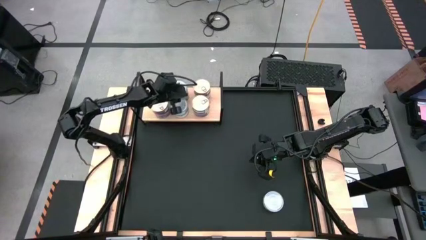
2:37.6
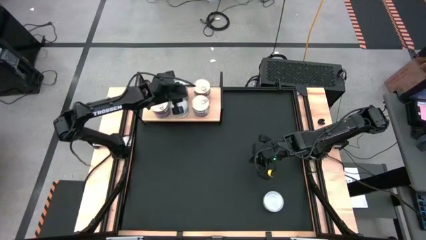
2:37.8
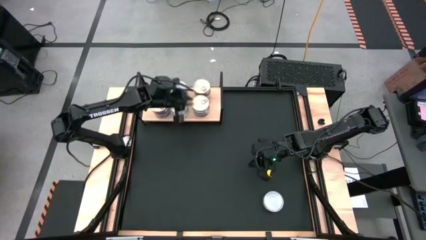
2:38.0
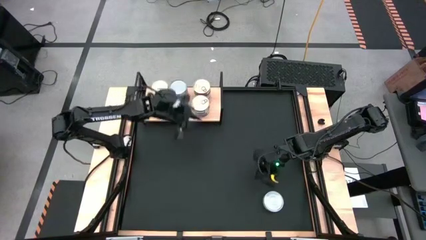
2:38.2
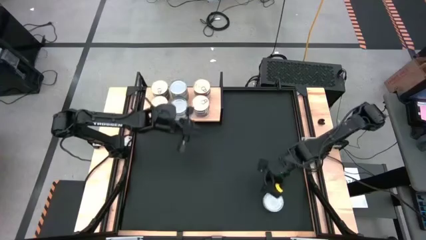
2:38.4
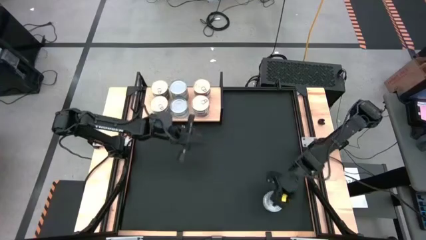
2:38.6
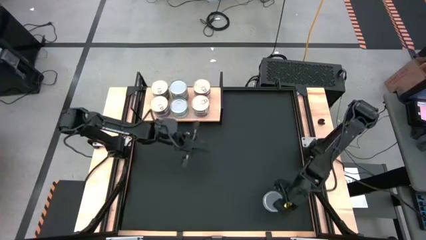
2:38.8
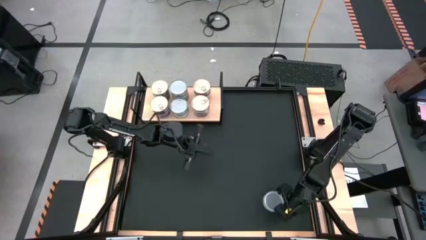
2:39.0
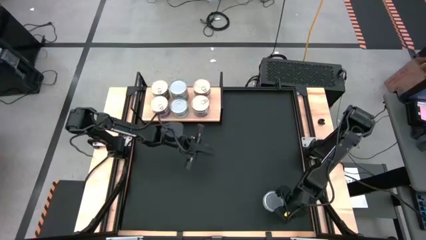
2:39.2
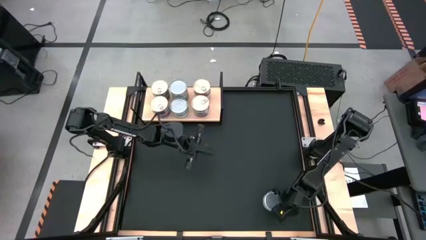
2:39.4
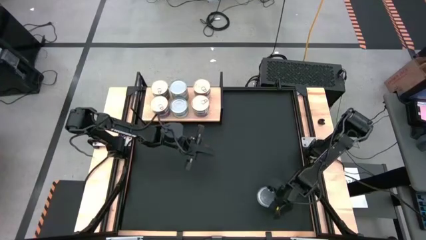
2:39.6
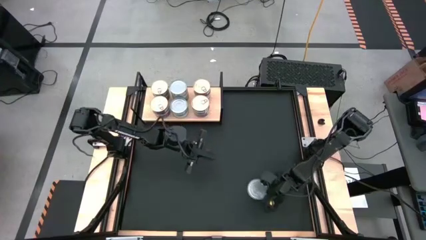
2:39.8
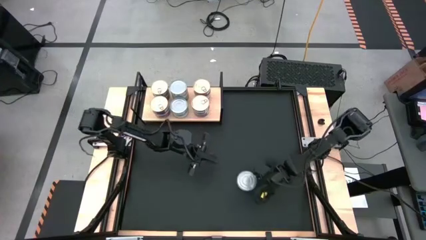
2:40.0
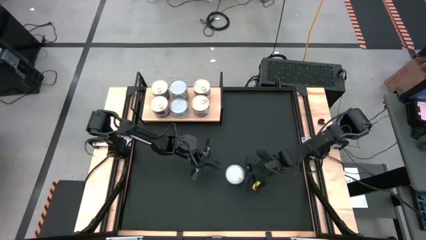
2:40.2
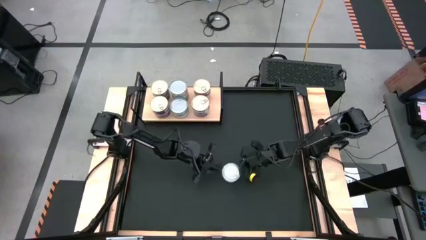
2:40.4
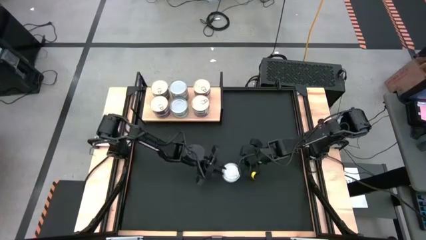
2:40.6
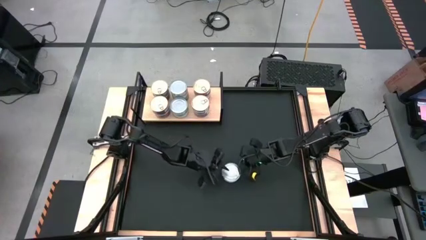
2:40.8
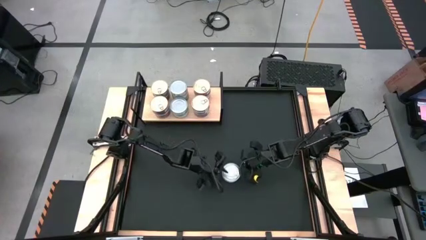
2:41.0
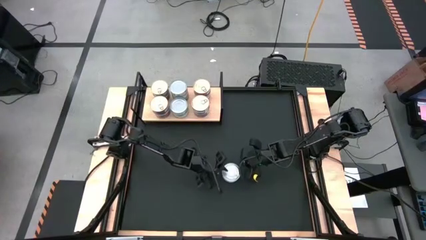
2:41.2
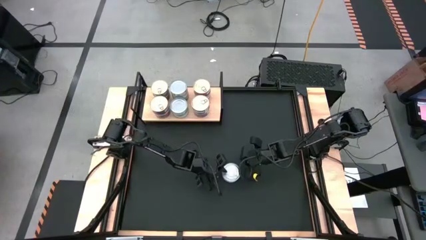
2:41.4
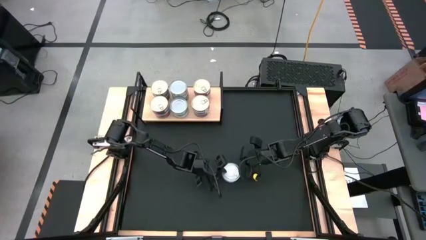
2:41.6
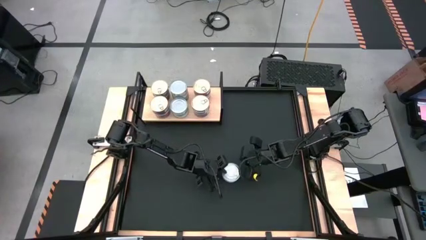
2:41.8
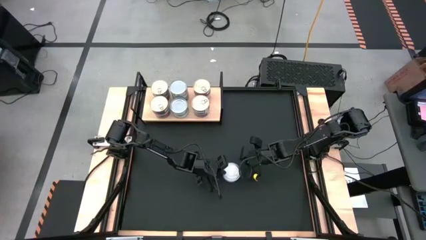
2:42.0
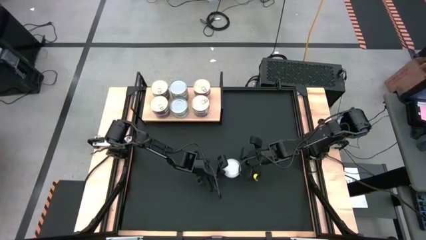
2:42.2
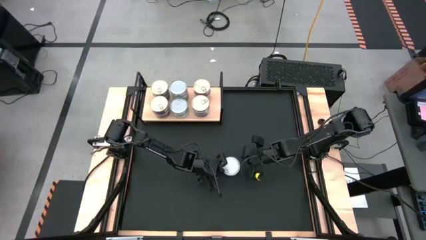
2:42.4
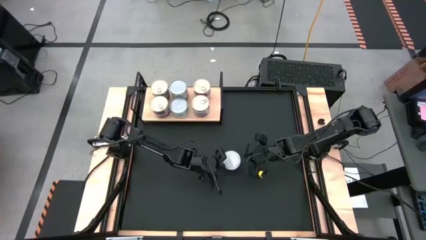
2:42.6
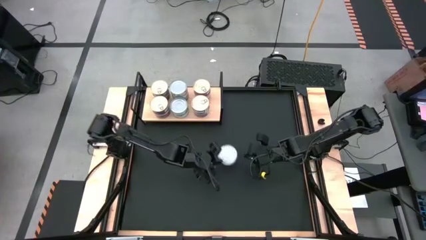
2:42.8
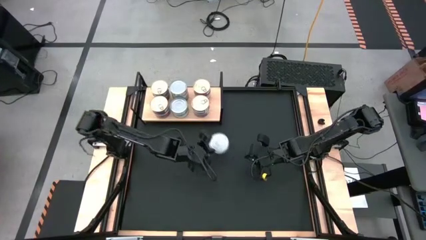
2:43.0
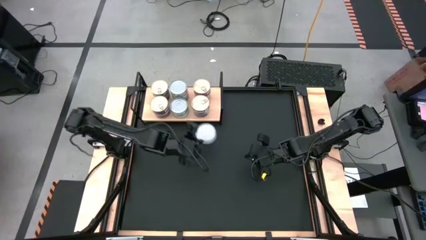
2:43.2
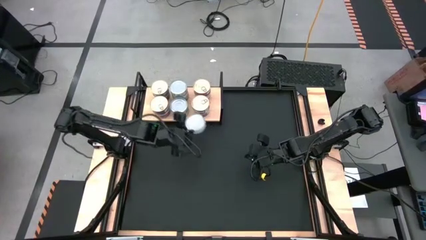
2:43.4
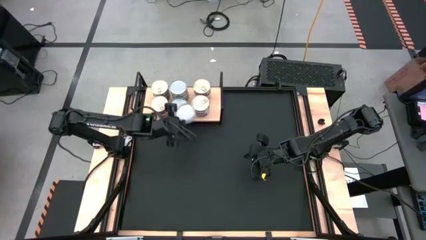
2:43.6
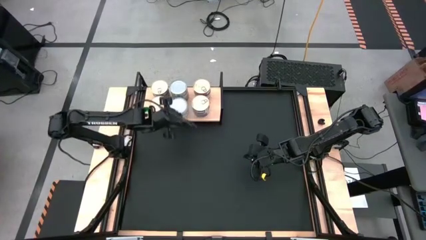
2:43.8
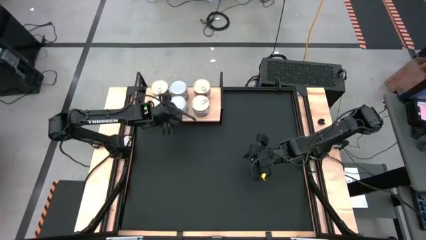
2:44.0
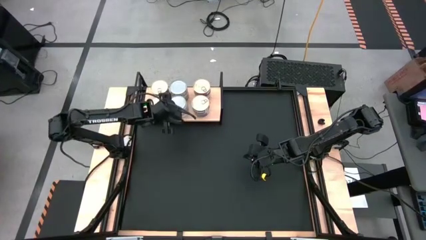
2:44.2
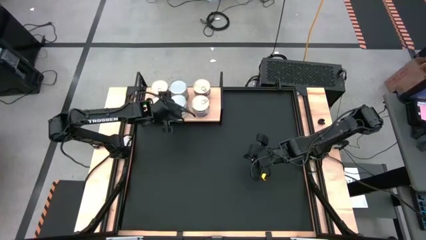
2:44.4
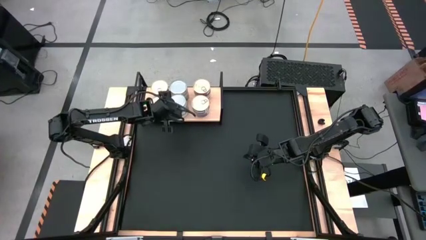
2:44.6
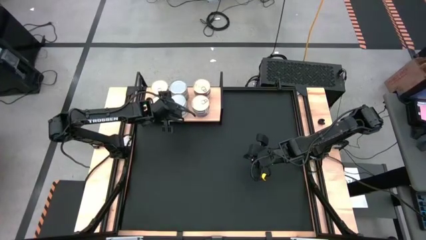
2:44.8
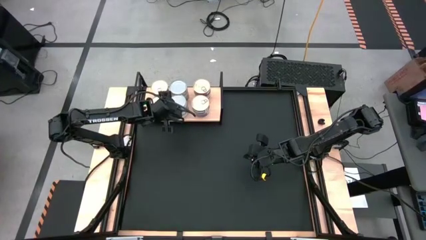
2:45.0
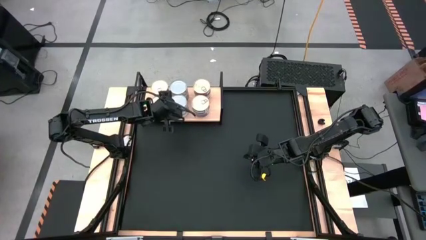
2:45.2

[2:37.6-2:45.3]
Task: Stack canned seafood by type on shelf
Stack the green tuna can on top of the green tuna on the shelf

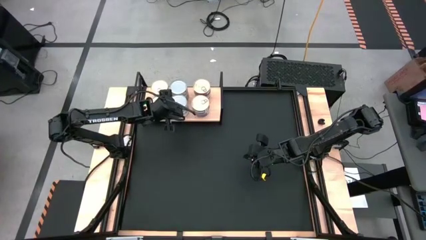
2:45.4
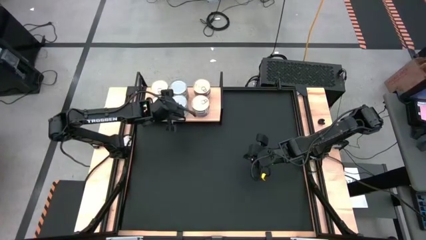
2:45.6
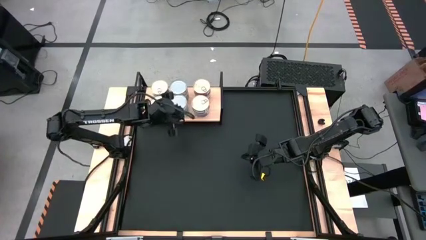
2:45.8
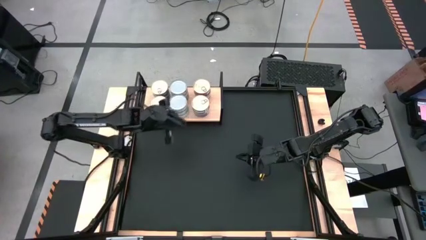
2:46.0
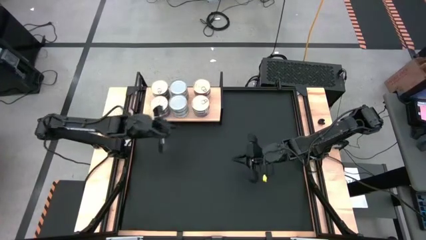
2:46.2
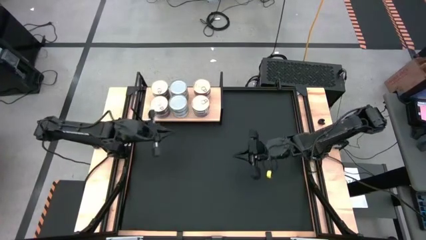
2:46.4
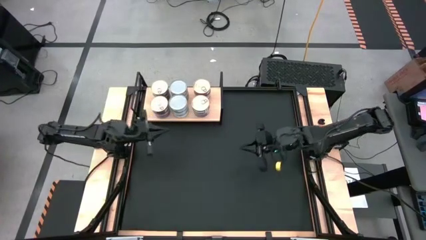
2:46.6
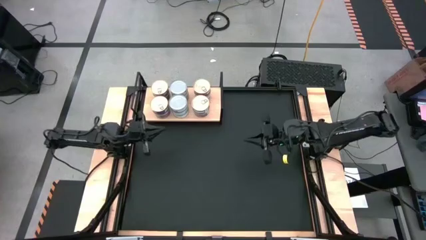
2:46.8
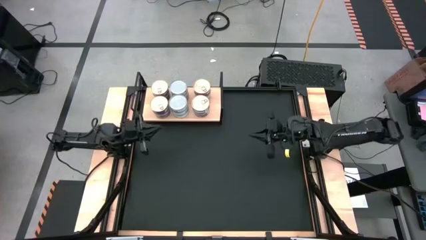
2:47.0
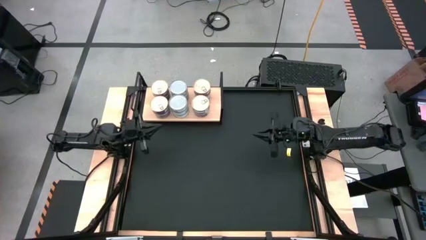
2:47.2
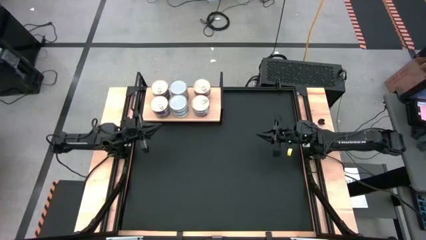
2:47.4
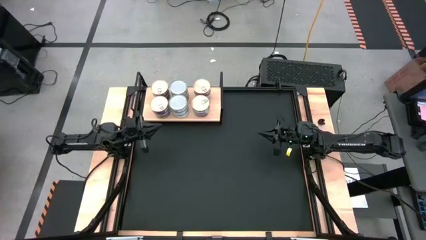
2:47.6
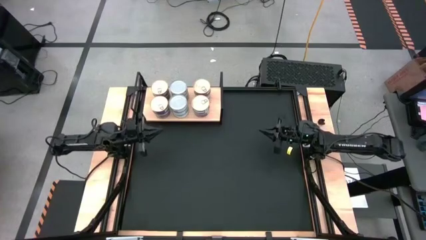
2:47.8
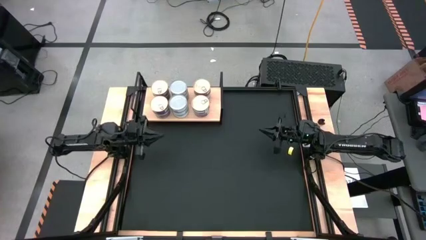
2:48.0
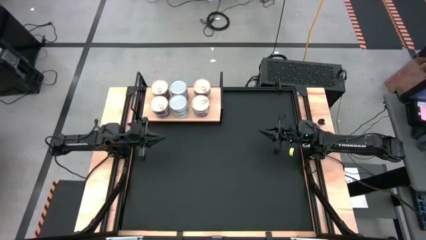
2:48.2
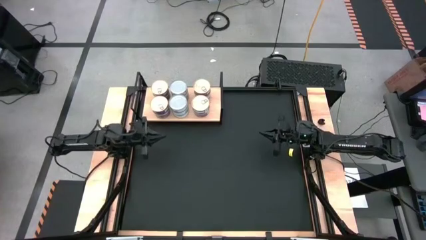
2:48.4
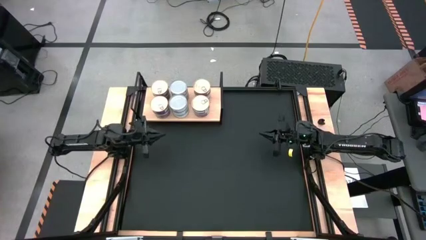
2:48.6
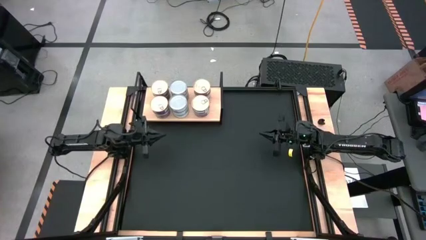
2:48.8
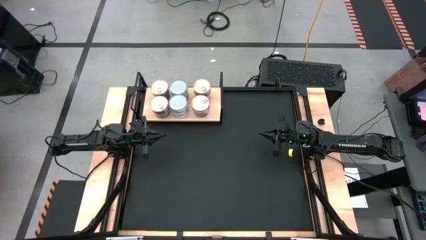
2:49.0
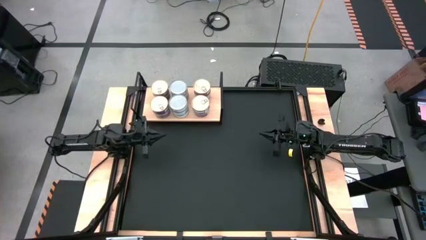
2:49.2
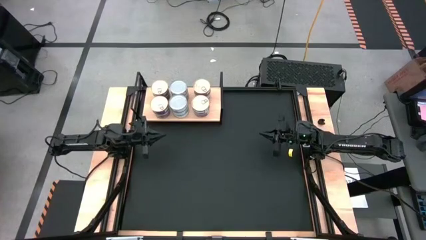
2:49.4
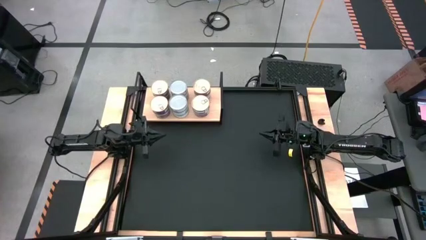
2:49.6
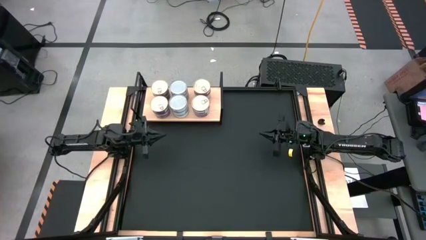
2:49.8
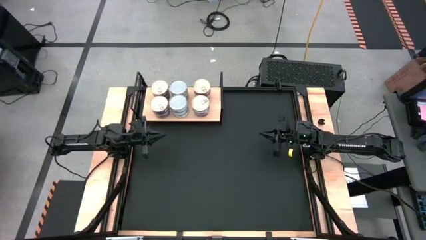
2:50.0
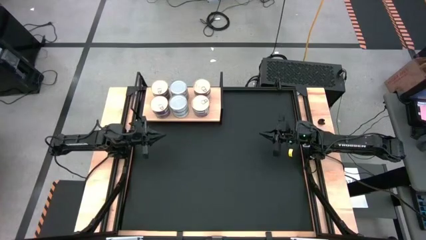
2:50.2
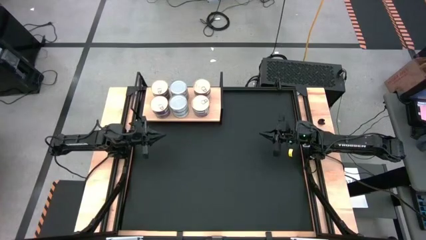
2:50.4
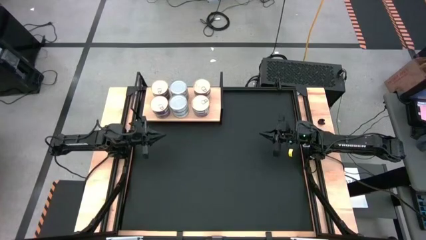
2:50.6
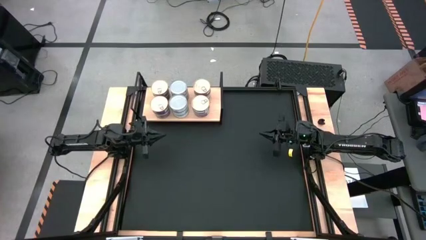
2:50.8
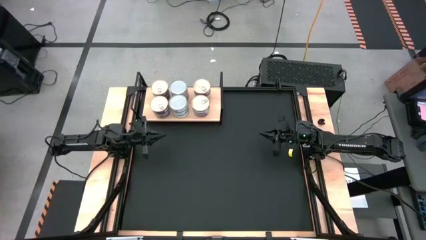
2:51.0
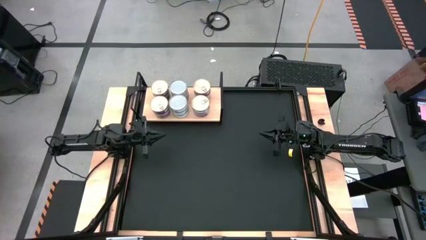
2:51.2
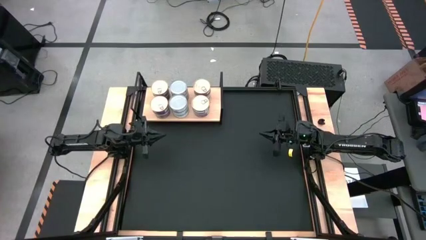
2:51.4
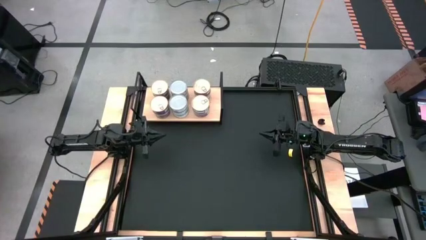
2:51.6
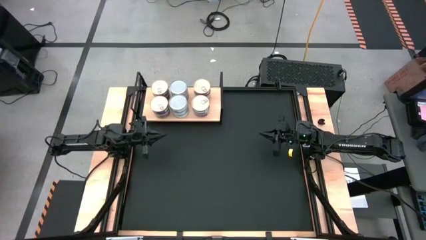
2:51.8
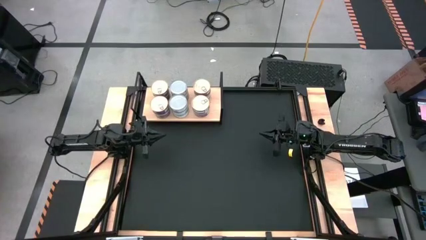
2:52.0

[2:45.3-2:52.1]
Return to Home Position

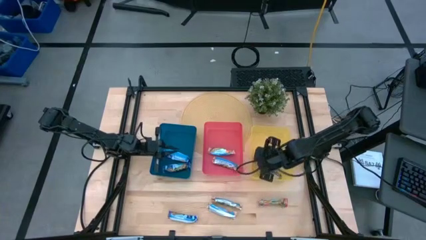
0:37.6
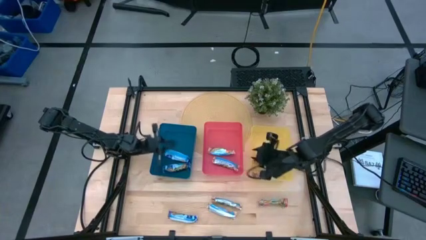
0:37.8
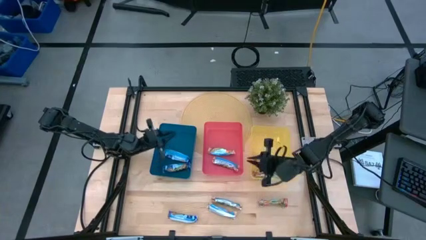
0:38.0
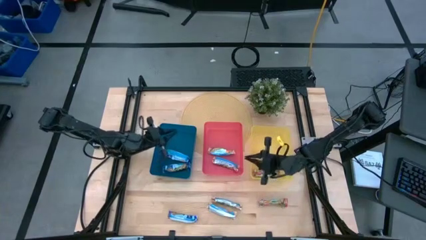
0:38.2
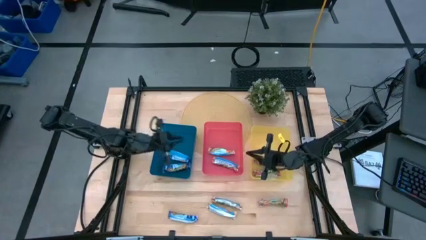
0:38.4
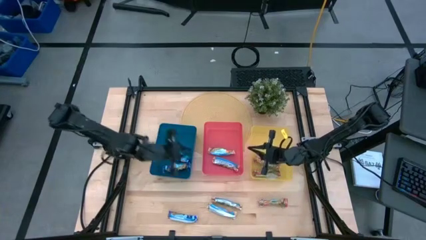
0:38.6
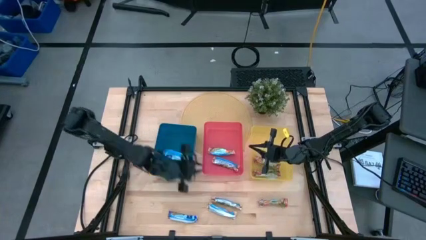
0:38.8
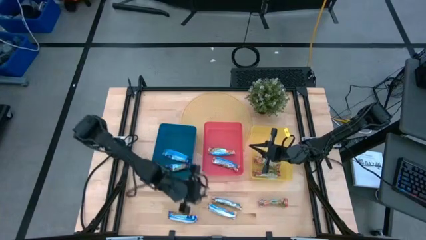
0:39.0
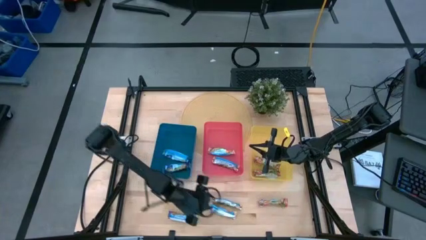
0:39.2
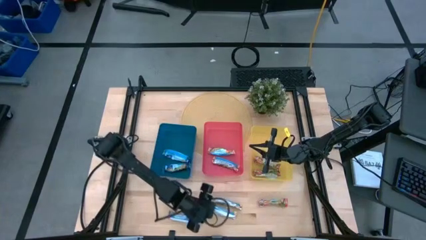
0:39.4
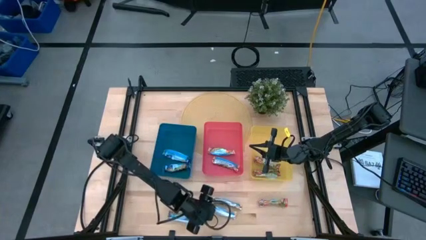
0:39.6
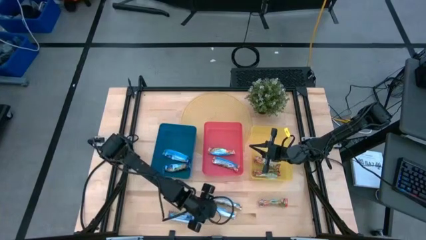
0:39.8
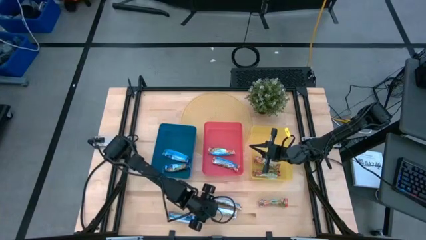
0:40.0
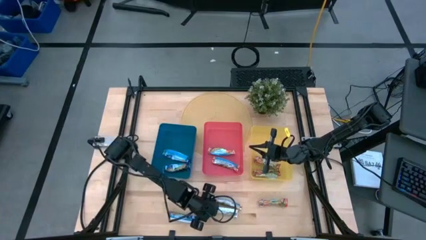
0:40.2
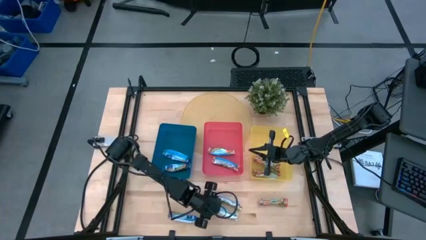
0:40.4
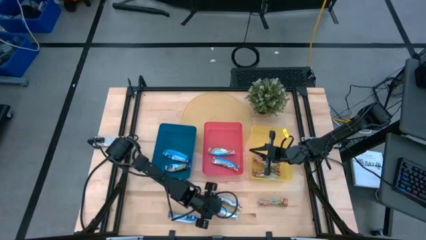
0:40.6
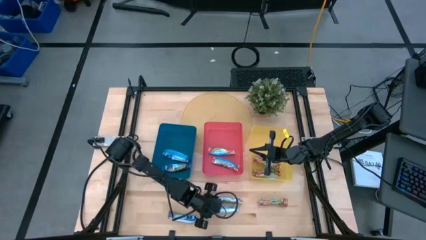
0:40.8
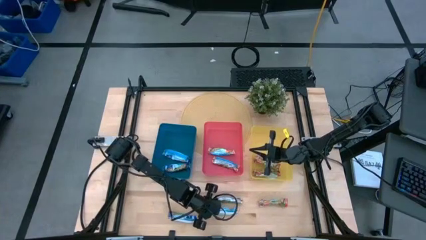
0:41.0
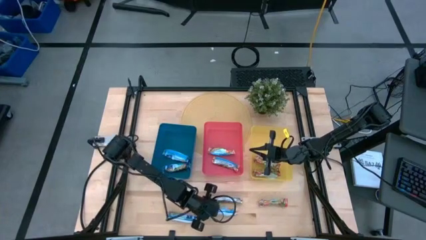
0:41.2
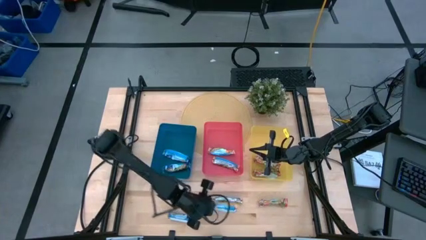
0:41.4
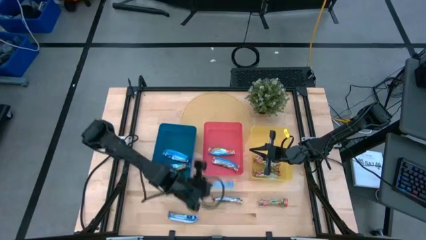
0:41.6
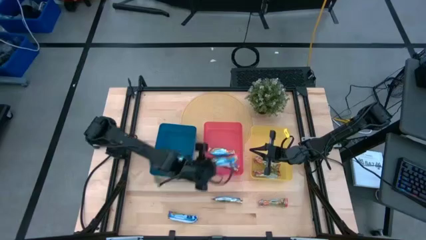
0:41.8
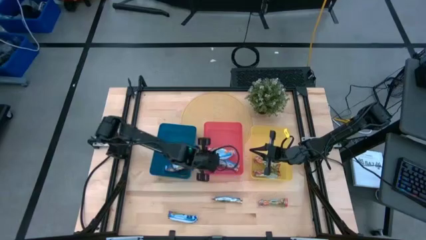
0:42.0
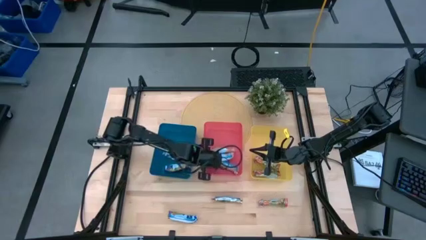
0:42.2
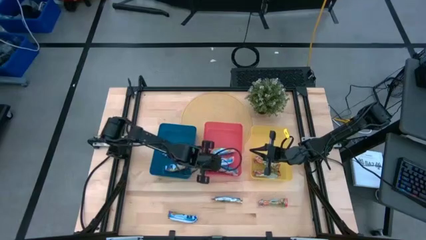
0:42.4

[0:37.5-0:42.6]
Task: Pick and place Granola Bars by type
Put the yellow granola bar into the red bin
